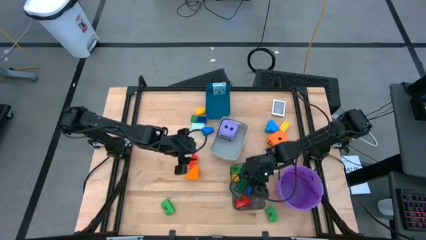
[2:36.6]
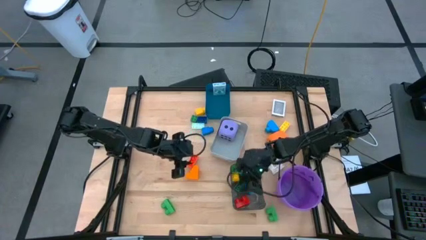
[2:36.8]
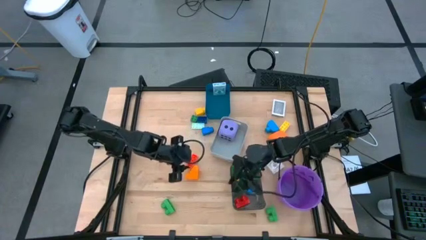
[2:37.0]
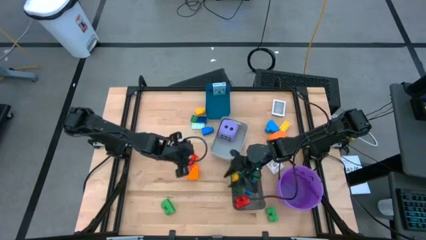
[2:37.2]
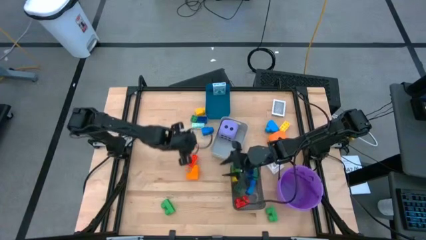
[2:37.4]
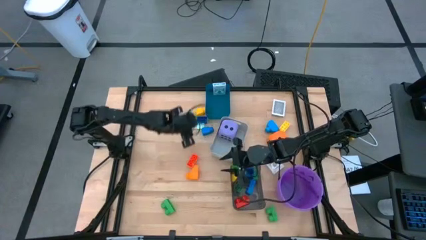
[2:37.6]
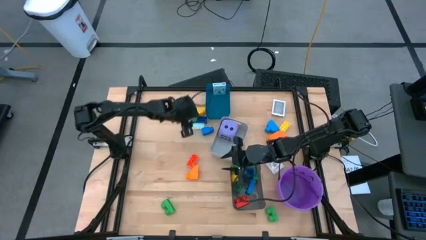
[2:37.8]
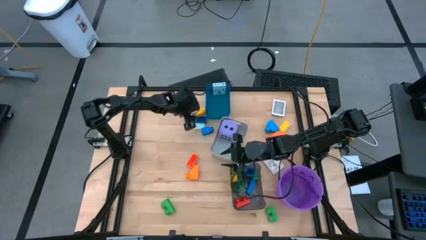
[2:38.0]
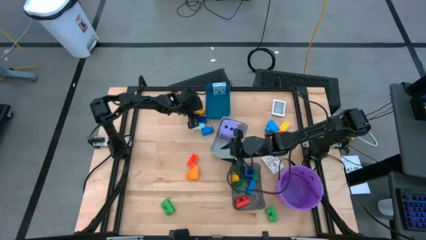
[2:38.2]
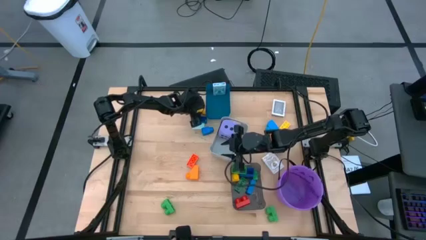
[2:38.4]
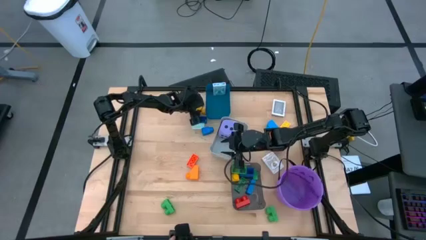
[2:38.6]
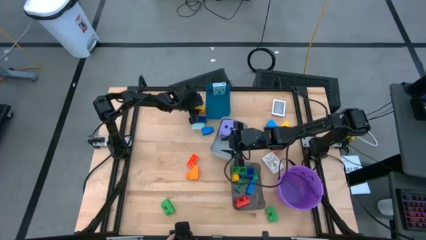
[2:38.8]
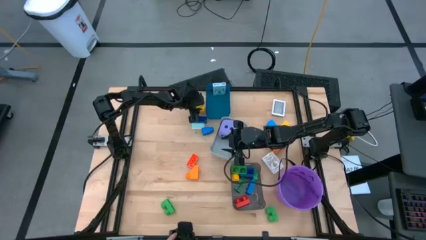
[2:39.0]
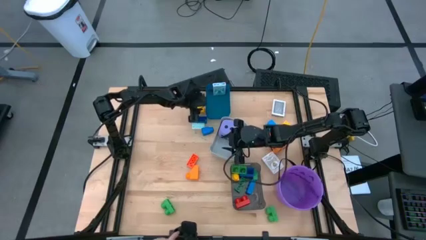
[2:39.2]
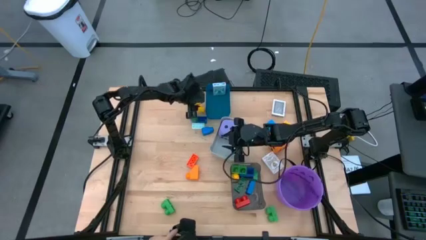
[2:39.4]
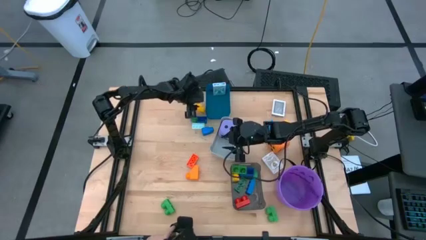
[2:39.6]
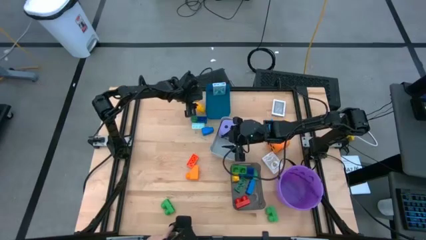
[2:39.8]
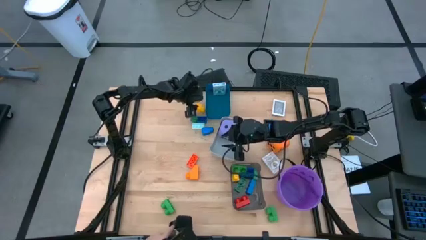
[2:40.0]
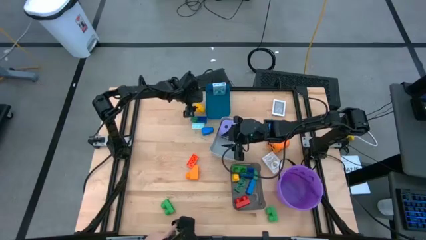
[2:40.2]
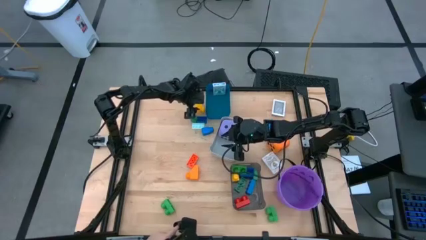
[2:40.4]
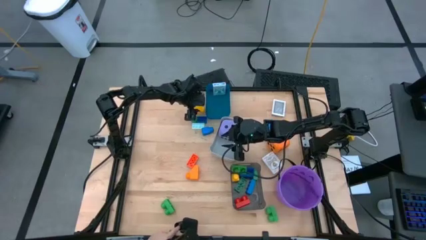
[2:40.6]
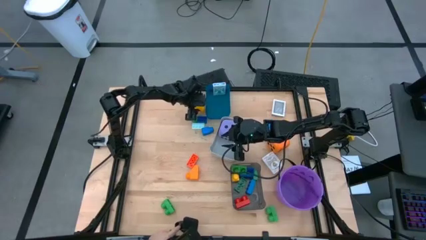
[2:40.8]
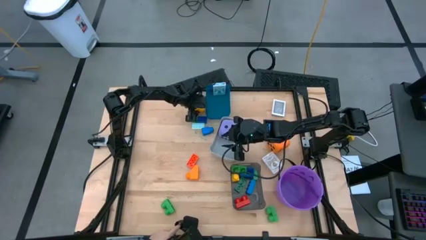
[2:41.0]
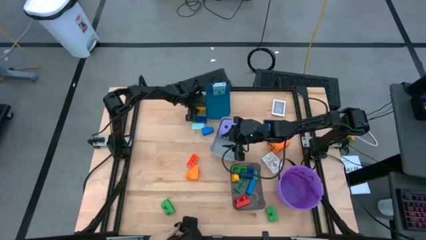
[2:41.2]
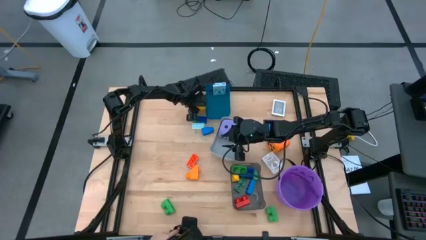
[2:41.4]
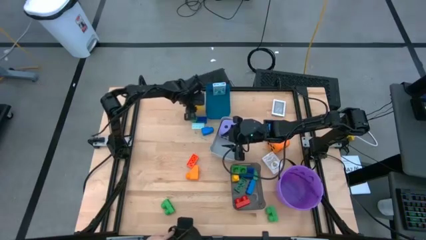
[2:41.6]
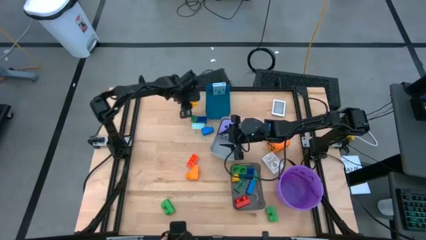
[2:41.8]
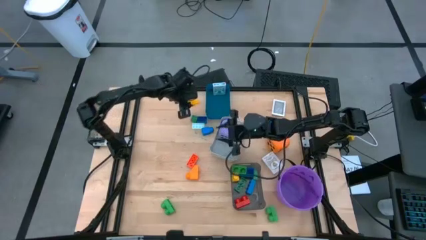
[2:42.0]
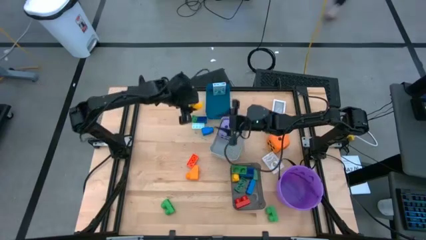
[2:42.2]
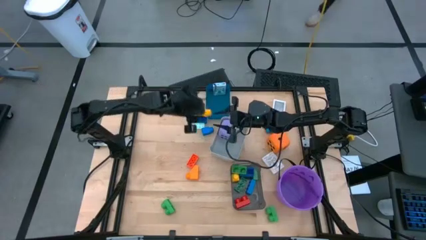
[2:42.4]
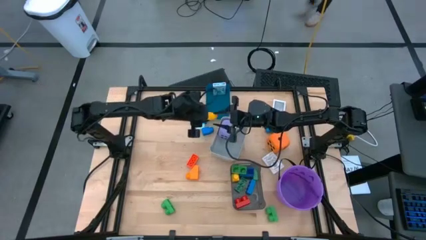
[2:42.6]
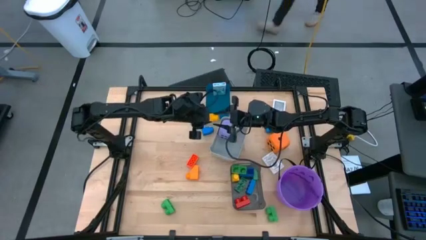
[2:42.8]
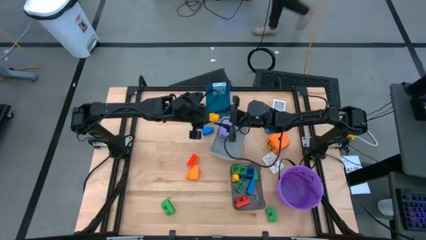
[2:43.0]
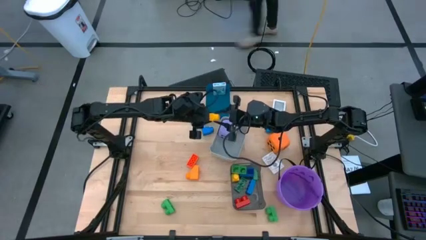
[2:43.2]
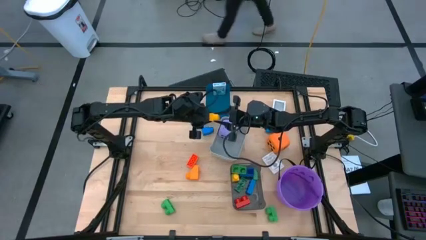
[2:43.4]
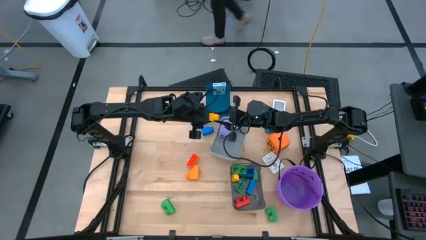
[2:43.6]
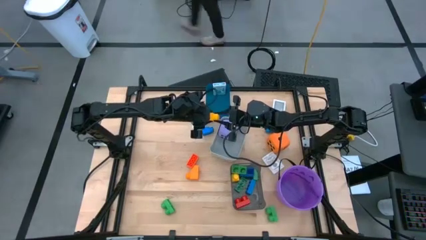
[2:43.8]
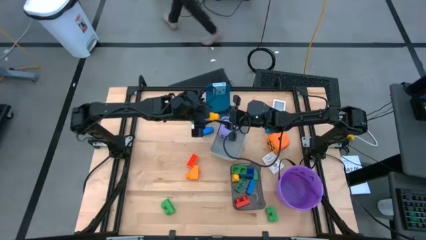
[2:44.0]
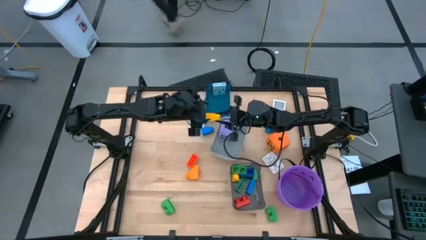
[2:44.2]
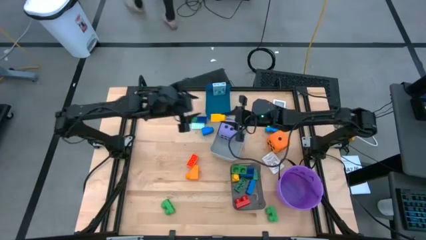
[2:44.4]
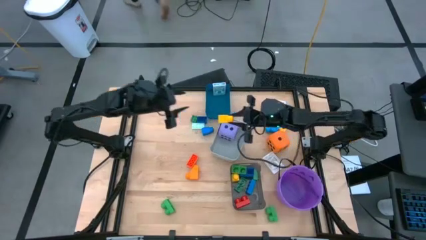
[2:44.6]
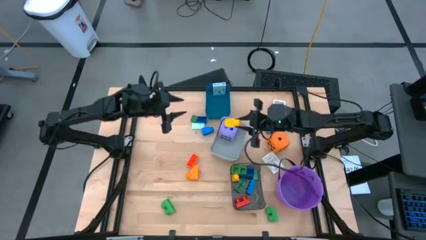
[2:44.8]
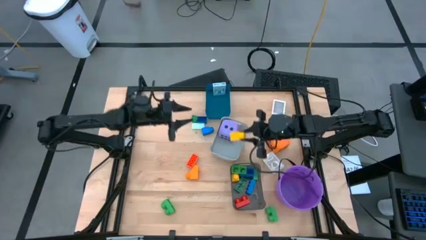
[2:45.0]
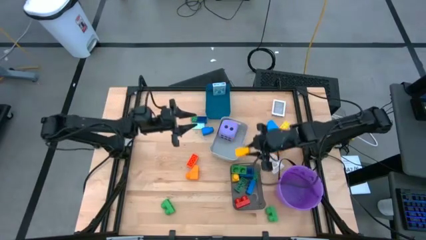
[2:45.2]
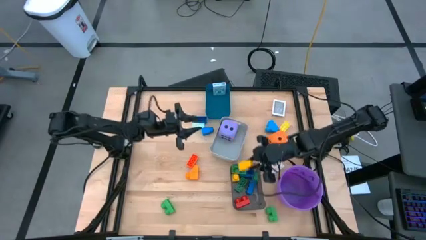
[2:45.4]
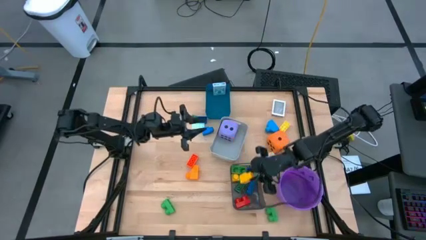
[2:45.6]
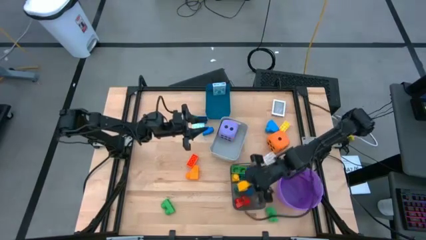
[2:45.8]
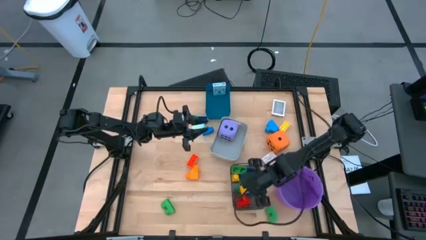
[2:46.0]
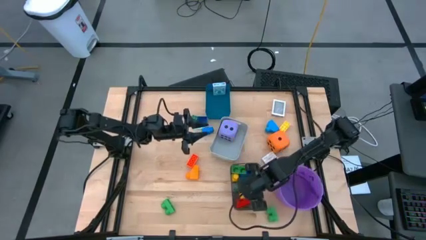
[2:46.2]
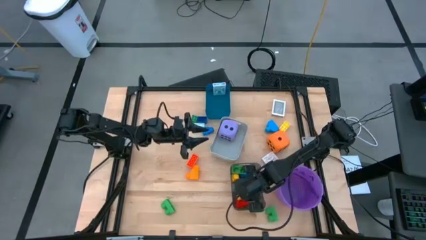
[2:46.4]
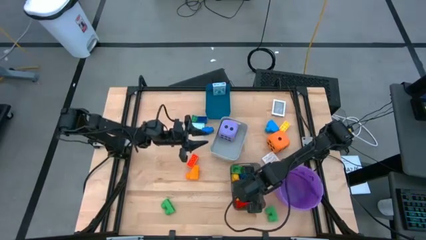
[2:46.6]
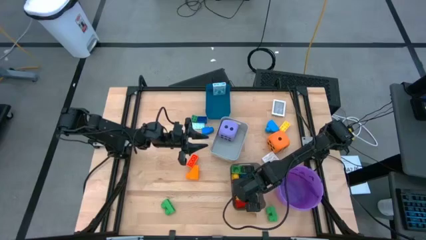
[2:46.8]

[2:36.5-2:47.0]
Task: Pick & Place Toys
Put the yellow game piece into the black bin

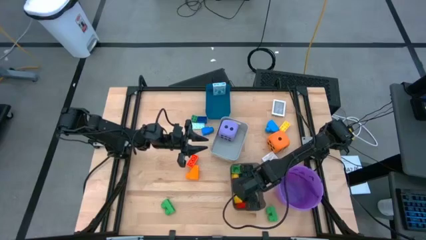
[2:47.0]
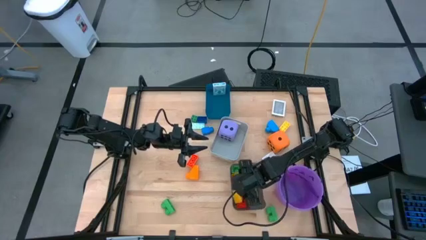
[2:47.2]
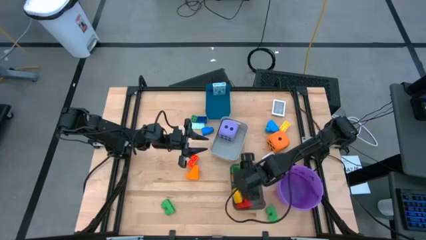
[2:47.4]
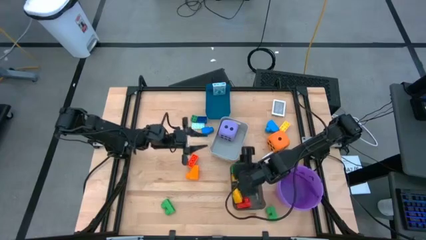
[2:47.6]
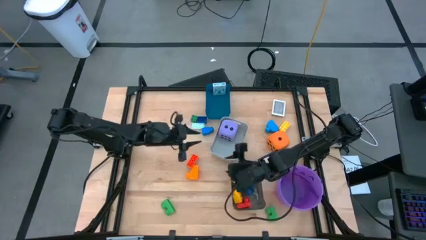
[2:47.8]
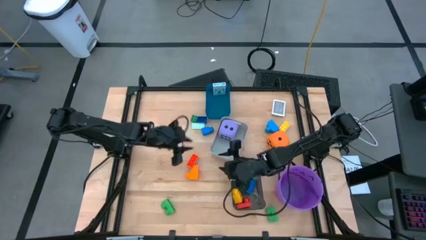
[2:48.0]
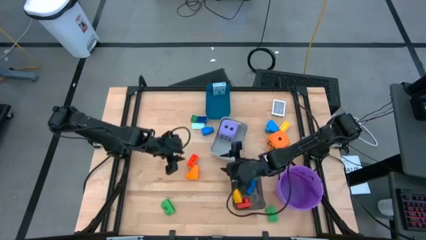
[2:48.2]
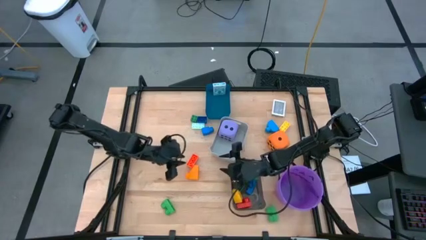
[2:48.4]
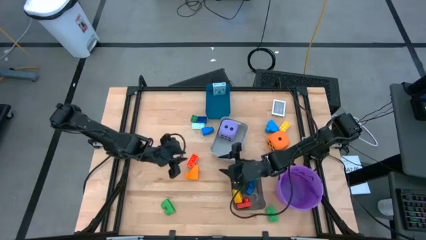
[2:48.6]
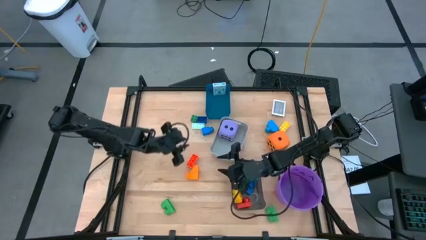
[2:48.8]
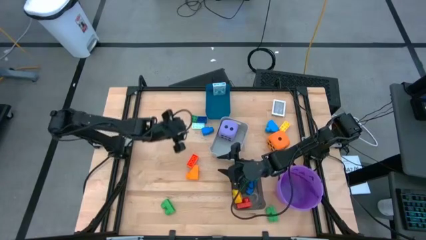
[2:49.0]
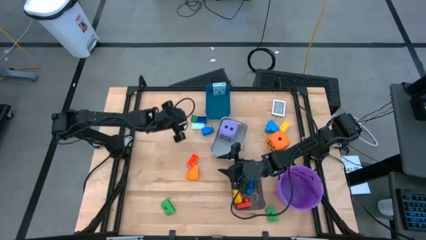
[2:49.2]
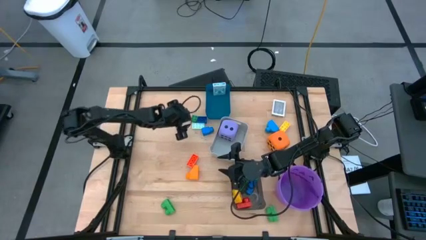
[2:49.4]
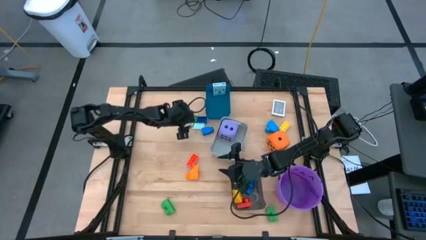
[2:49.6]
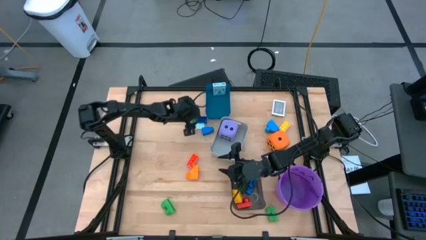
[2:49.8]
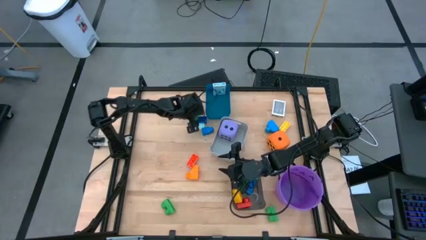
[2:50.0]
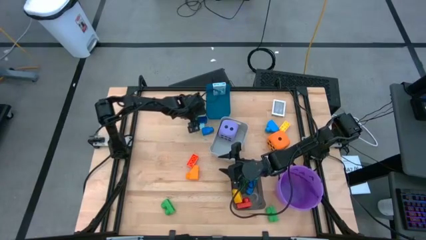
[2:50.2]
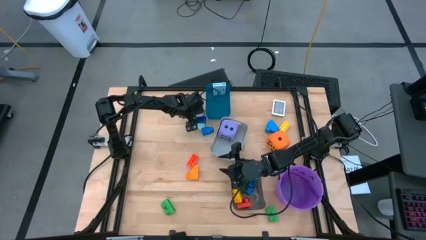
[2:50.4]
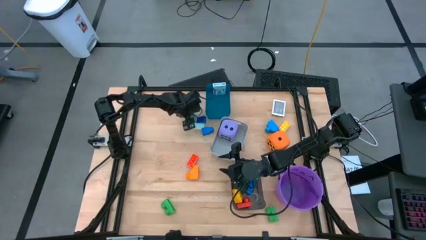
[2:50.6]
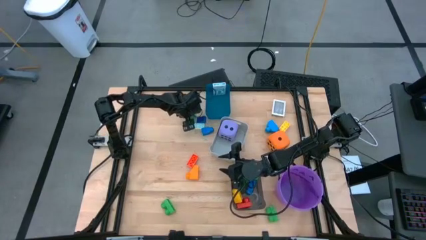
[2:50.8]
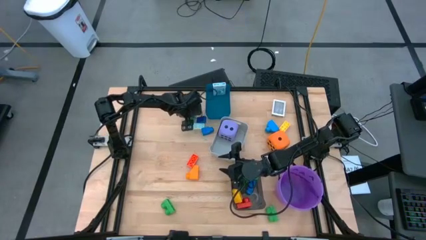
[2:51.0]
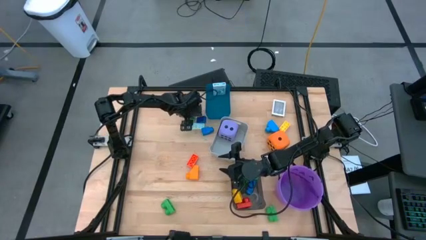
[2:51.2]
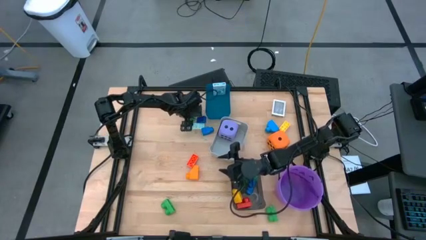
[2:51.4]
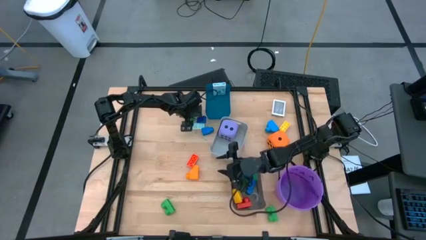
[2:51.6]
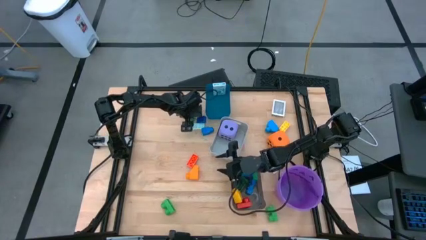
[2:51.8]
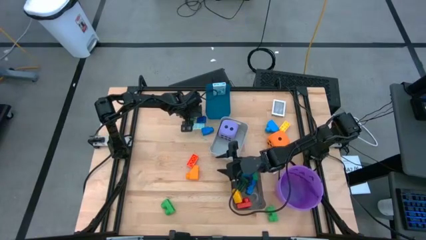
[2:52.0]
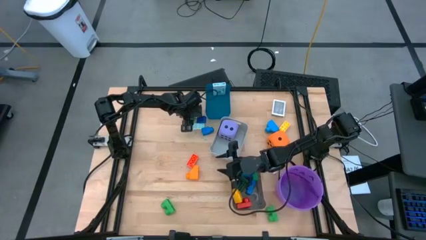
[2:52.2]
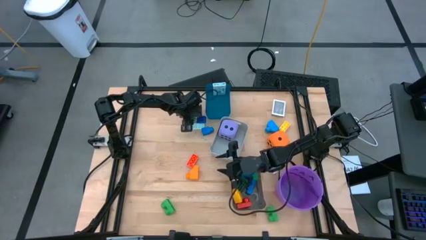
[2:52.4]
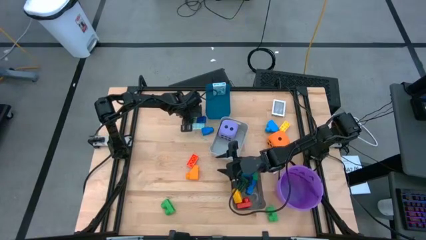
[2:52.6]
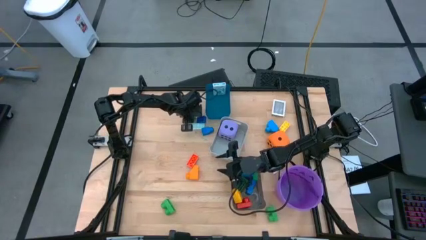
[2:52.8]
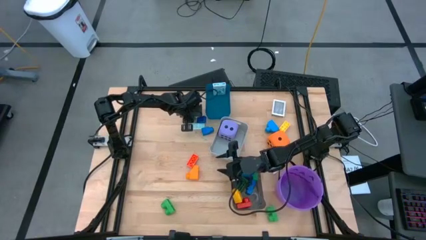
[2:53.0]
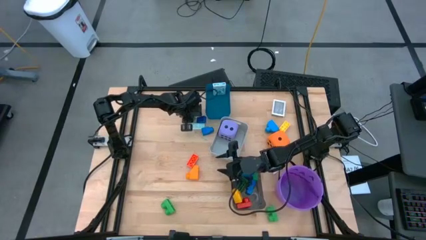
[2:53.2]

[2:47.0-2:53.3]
Put the dark green game piece into the black bin
